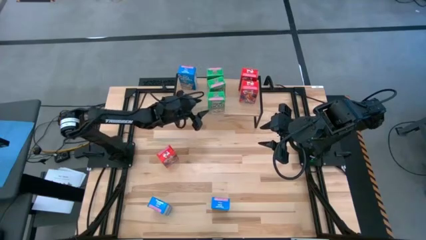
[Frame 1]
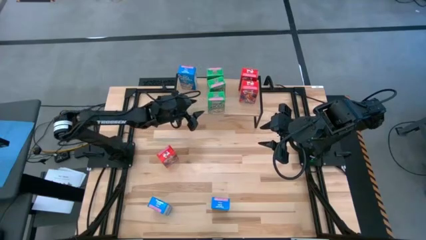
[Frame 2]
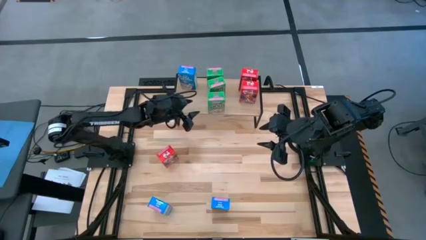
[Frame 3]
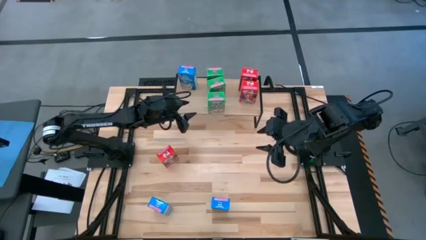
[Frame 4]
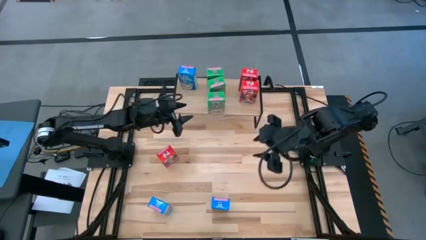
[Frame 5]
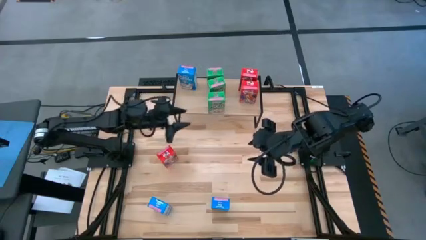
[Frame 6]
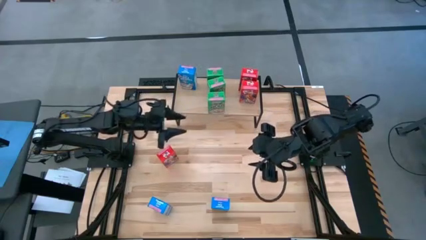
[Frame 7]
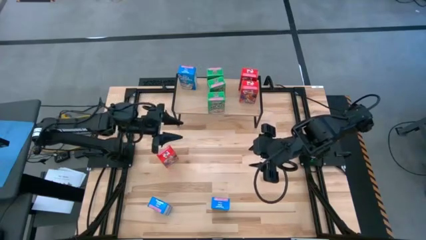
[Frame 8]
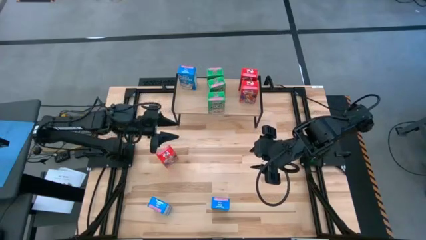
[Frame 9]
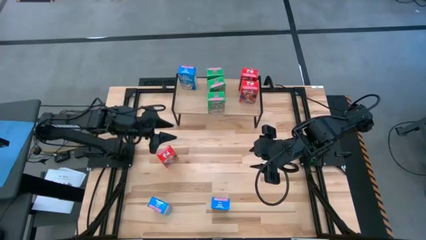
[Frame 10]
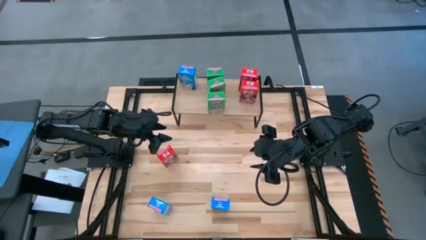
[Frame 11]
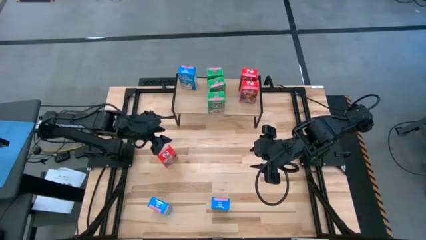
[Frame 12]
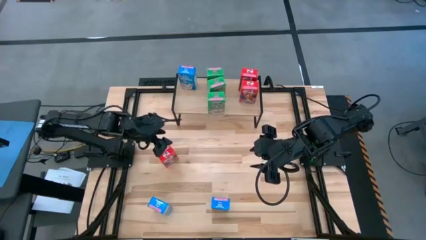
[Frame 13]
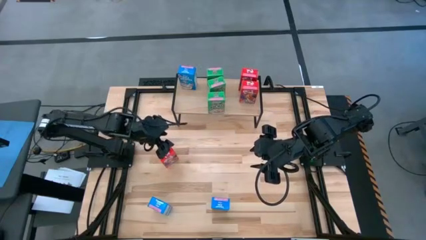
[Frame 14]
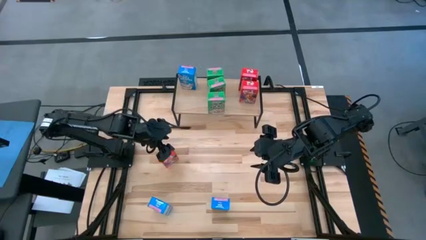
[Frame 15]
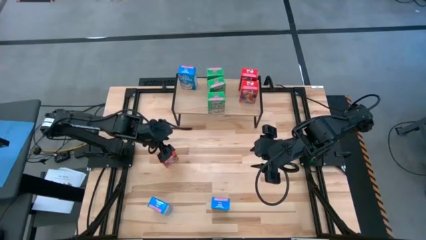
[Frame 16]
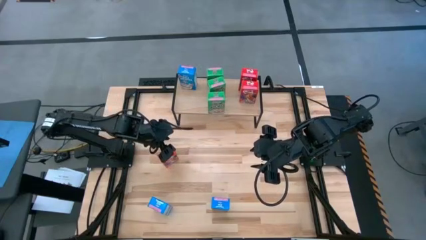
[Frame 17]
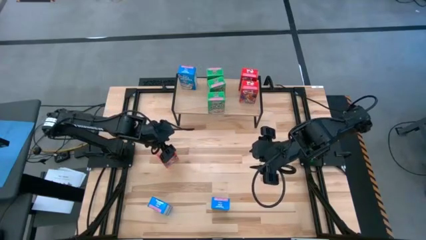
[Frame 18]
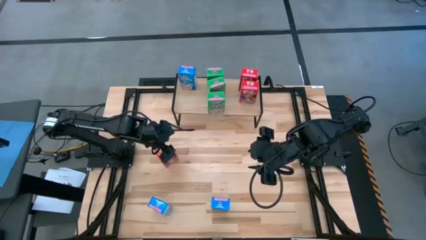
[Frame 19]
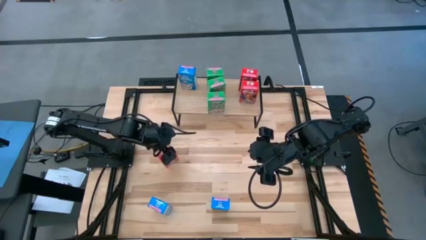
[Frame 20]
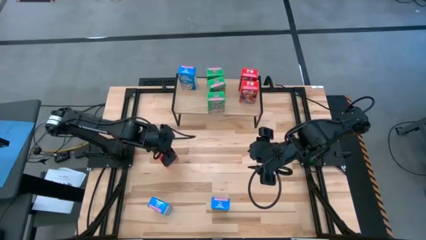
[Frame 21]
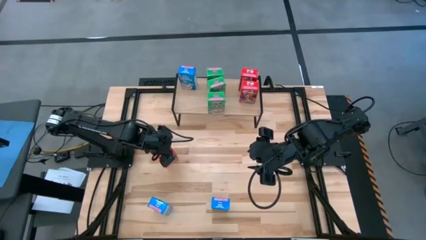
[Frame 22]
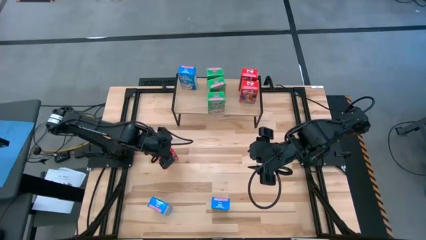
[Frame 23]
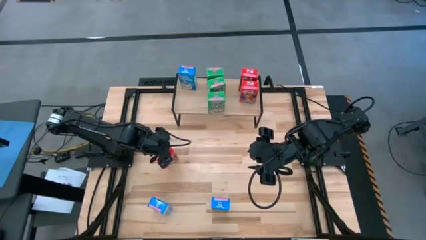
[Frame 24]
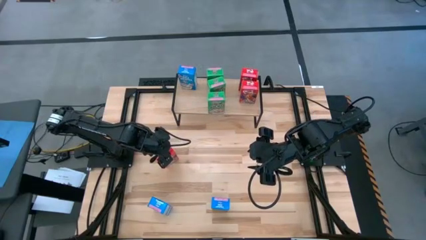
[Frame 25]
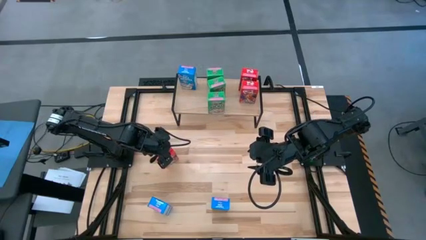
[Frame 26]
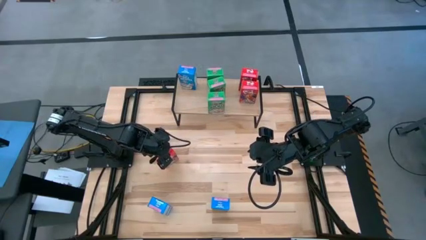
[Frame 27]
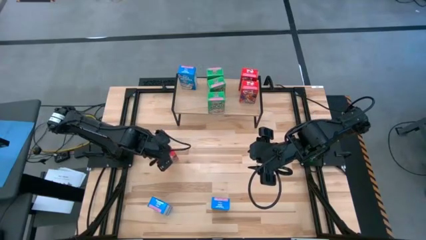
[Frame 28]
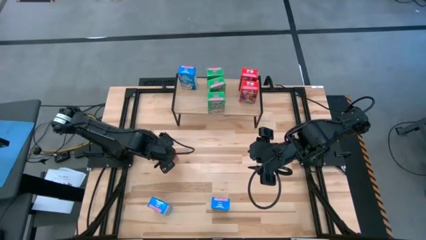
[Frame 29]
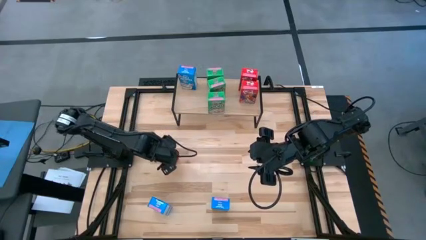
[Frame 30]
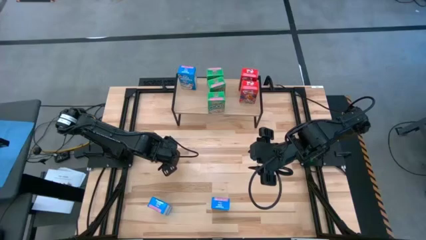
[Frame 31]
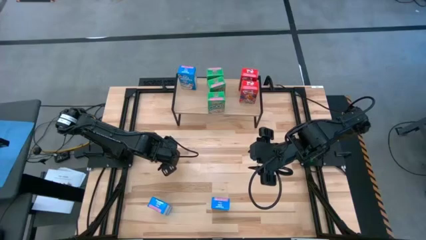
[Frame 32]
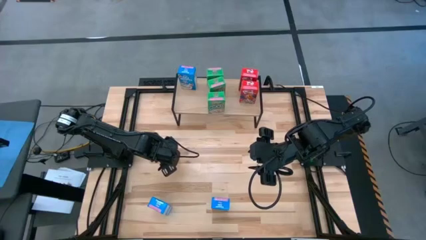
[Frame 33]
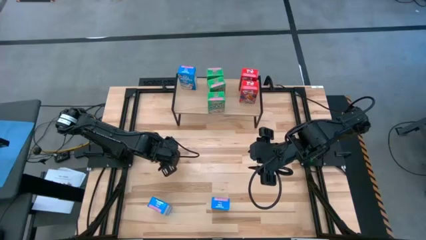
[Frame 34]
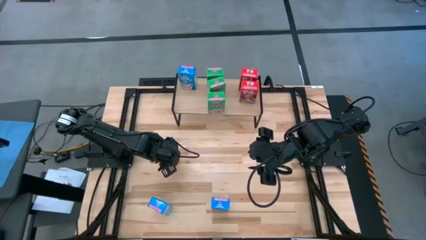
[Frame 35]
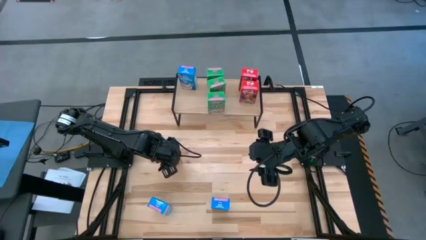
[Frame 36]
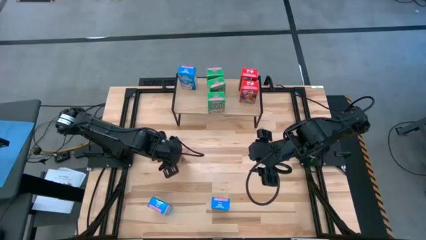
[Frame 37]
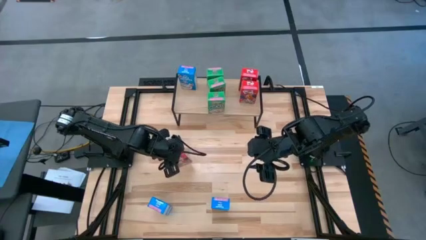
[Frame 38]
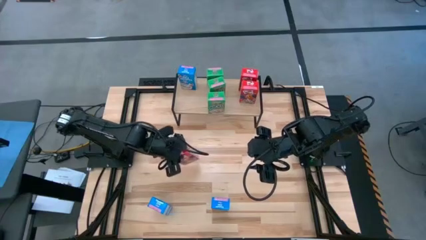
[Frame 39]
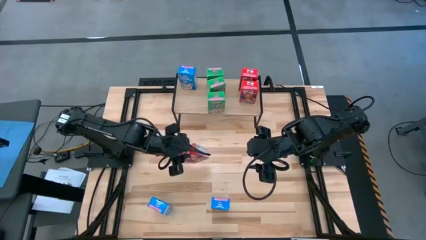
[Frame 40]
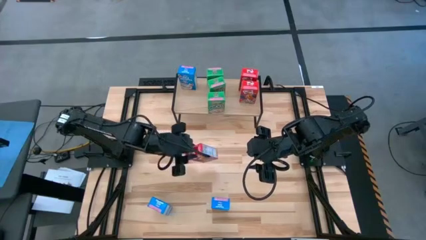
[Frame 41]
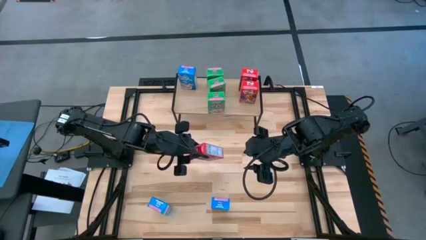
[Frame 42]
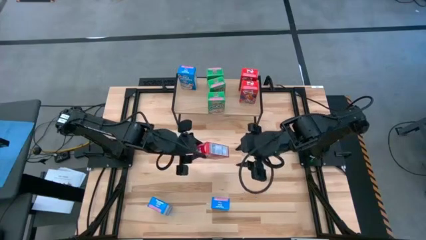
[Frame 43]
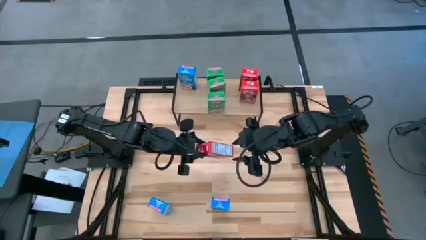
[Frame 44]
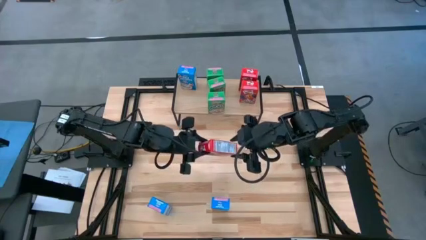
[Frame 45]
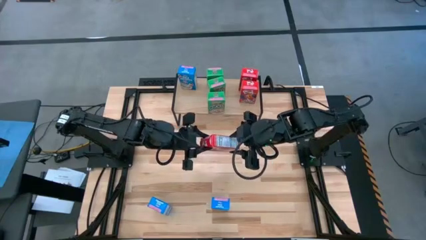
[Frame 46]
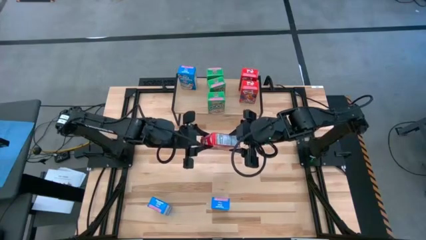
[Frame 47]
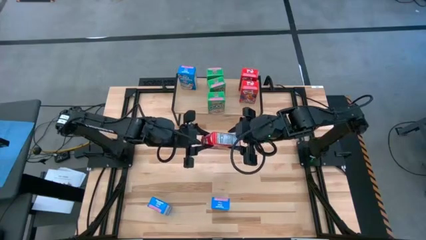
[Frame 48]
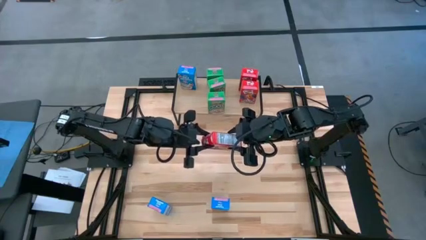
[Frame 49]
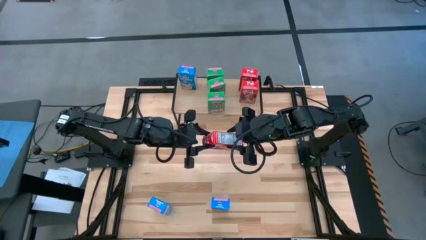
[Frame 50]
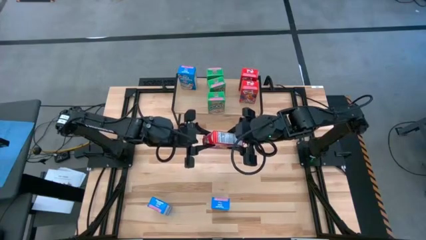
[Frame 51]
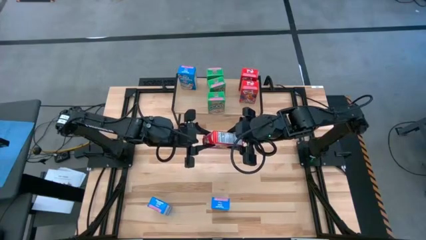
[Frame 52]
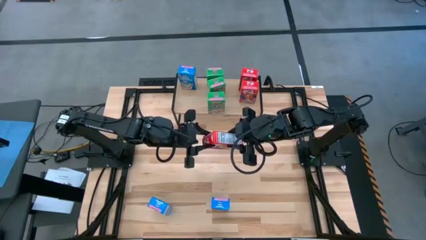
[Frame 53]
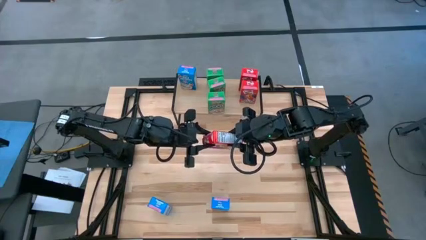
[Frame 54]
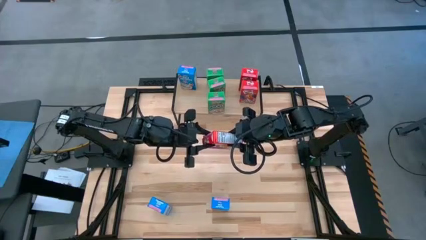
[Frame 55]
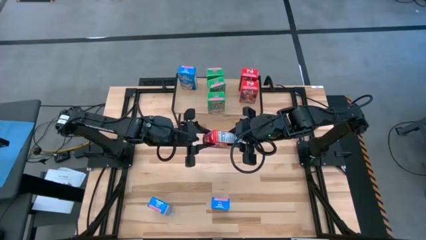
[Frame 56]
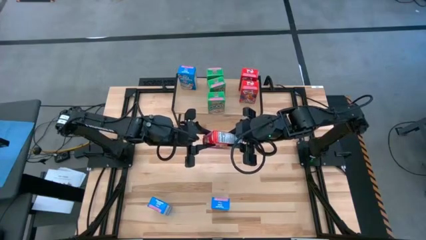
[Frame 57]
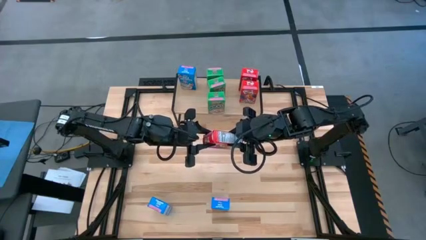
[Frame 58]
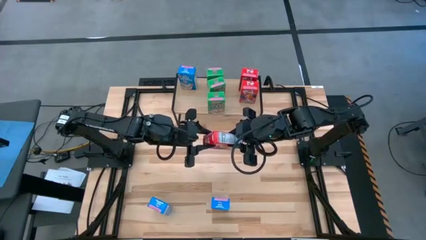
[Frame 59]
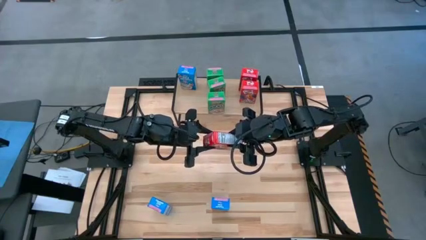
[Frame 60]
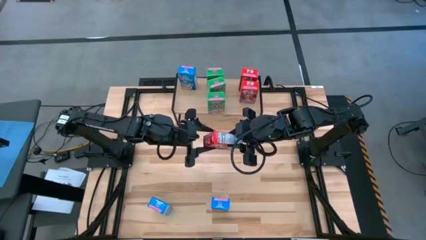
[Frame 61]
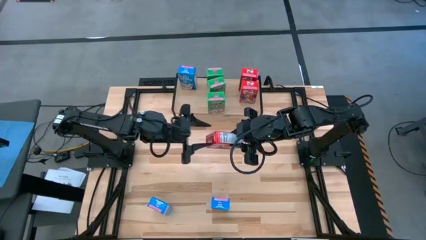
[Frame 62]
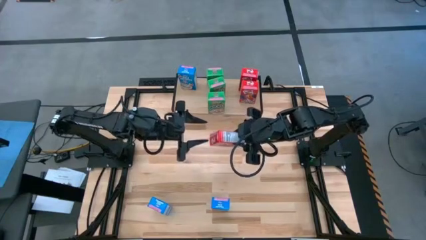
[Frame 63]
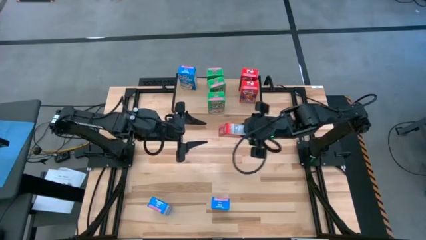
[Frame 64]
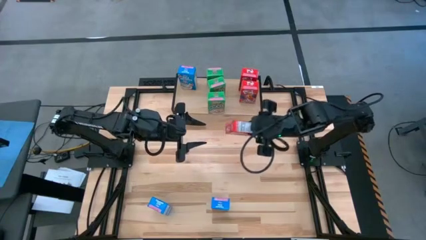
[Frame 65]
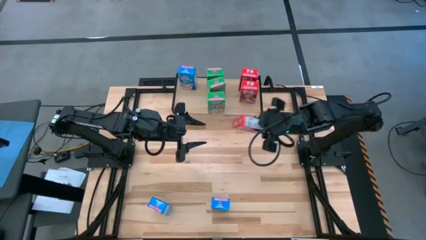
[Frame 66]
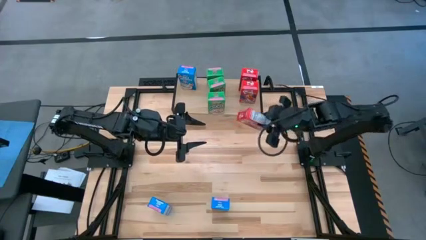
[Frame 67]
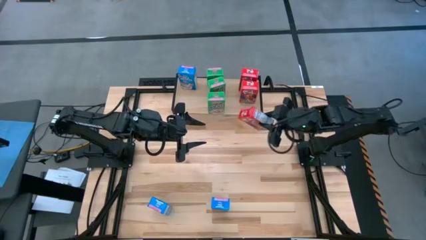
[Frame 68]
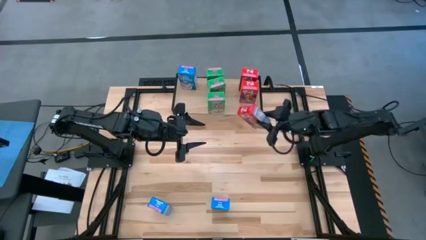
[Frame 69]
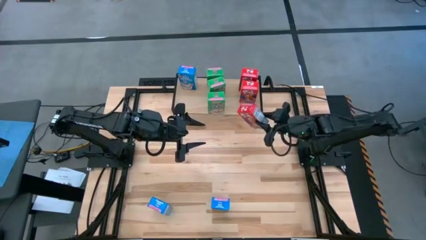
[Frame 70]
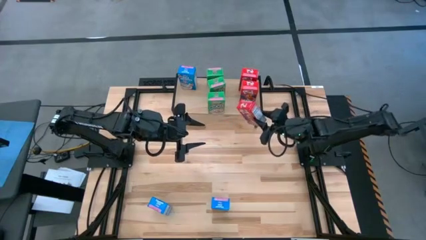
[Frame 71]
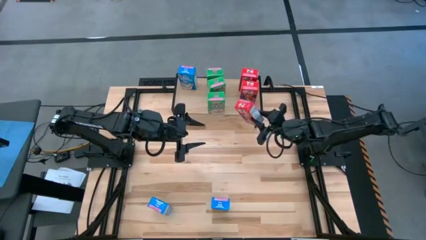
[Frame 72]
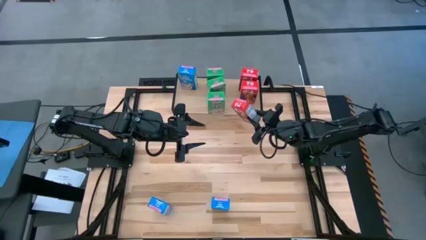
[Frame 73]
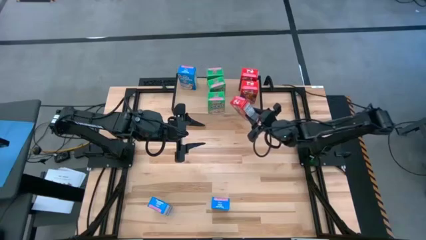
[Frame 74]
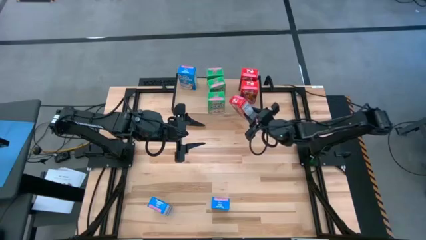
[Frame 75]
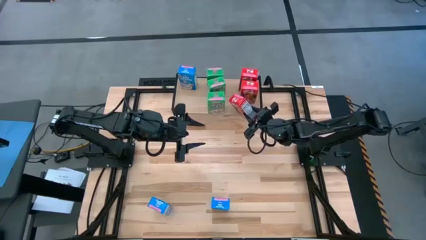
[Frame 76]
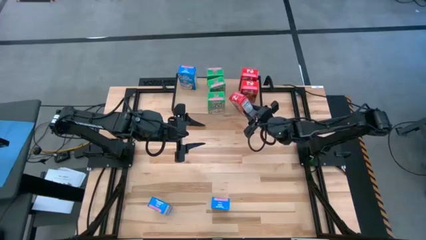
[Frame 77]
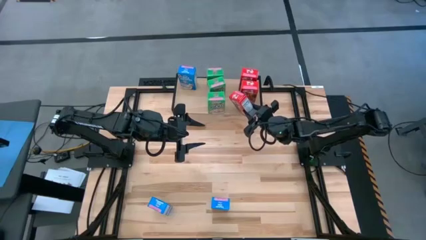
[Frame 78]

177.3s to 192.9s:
Task: Stack cereal on shelf
Put the red cereal box on the shelf aligned with the red cereal boxes

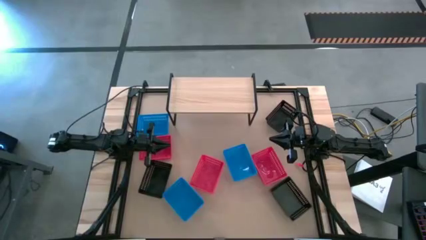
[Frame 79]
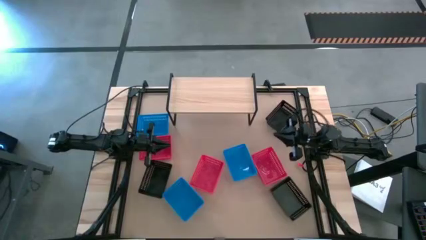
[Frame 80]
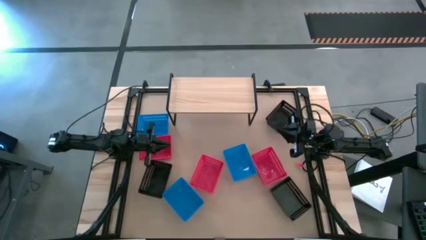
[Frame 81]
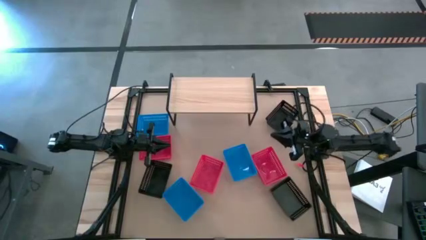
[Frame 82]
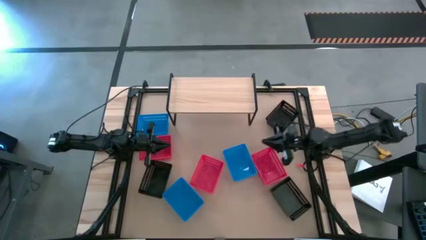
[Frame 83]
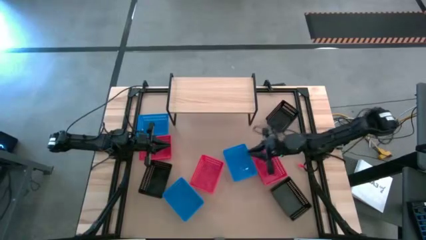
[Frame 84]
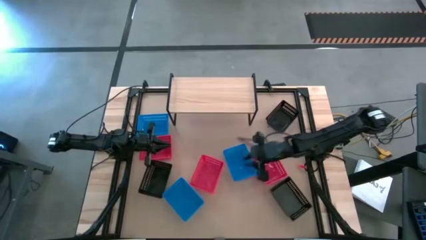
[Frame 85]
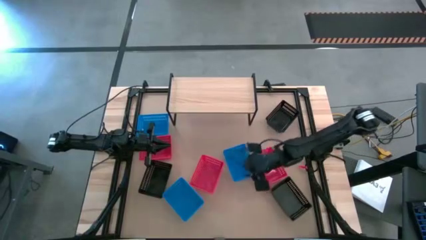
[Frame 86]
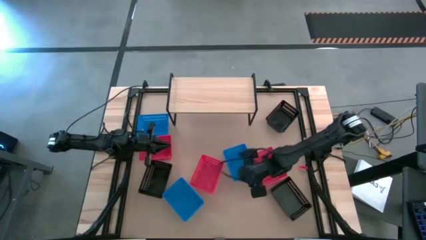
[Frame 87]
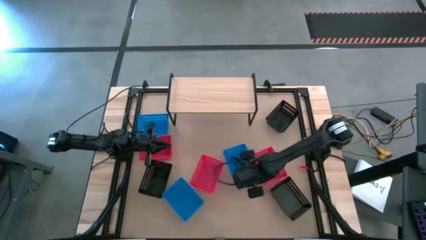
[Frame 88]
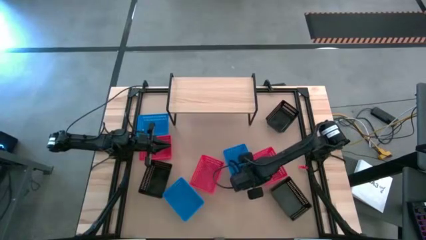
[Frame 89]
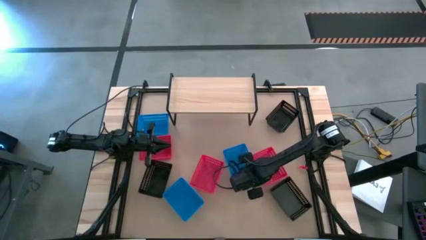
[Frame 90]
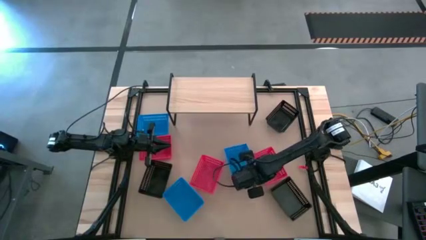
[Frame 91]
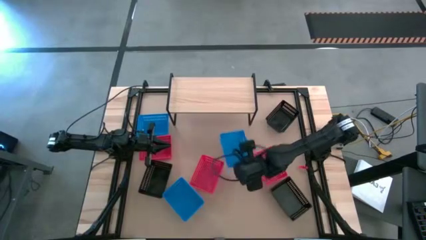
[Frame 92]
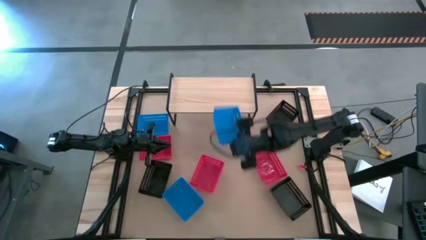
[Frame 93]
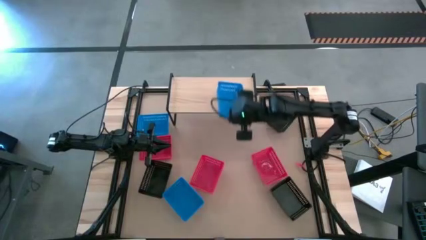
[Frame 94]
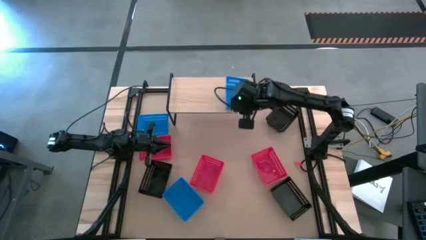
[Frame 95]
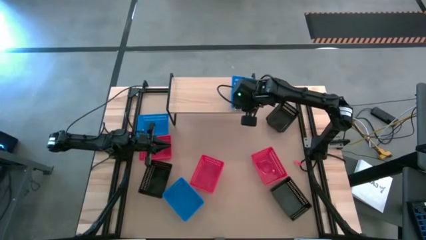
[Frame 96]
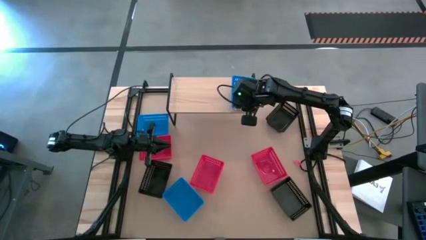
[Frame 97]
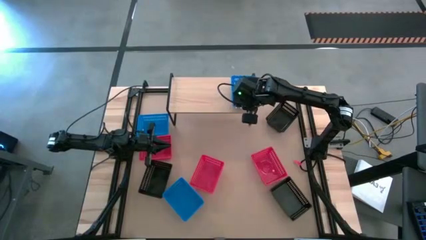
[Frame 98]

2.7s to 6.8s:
Task: Stack baskets on shelf by color
Put the middle blue bin on the shelf
